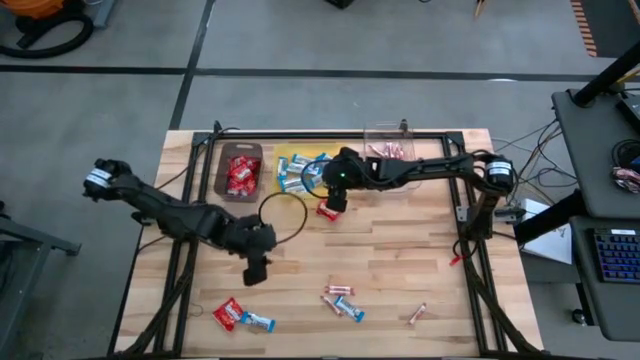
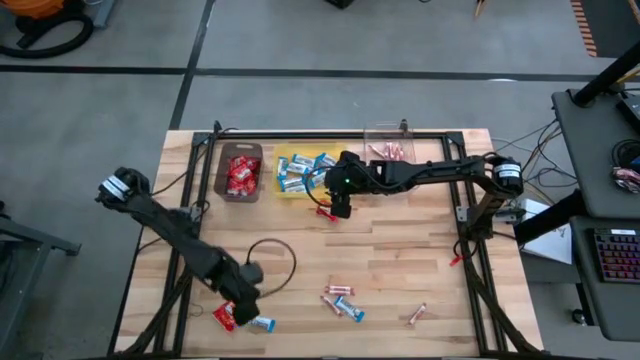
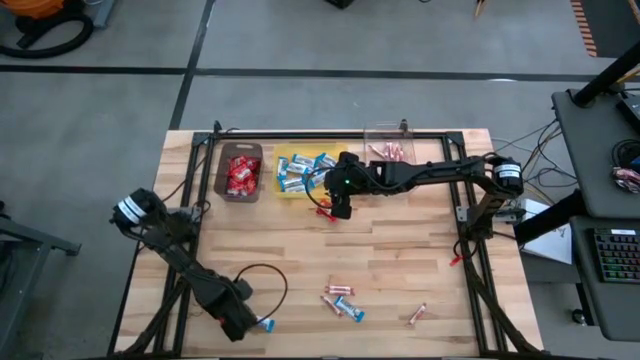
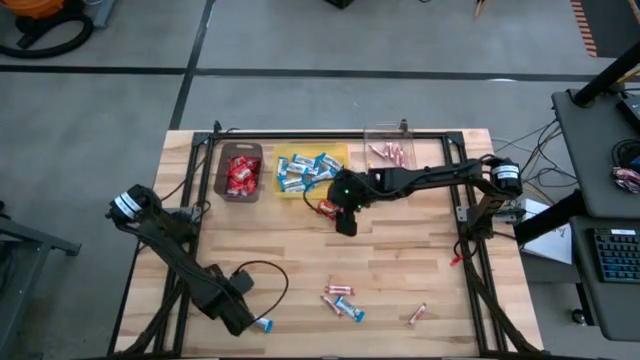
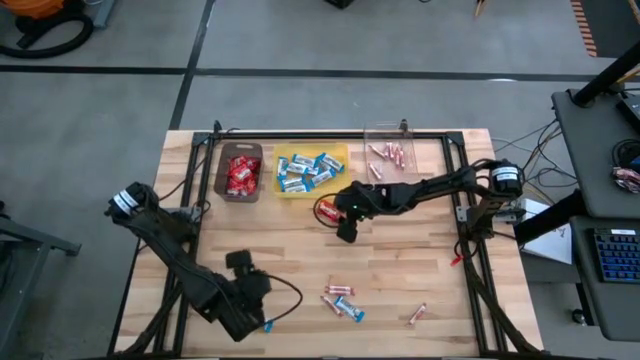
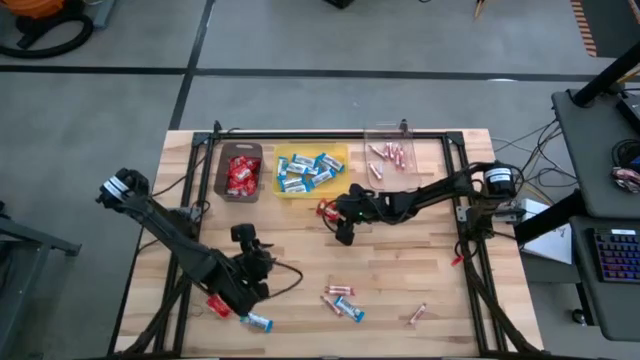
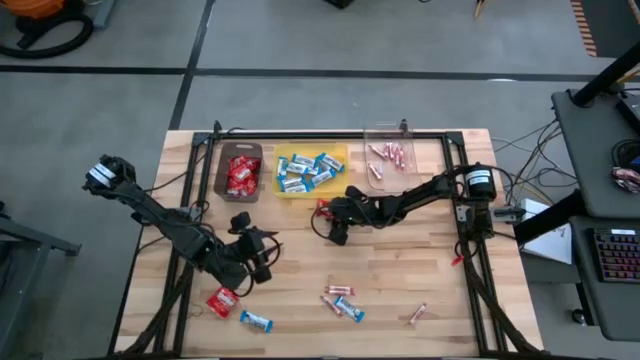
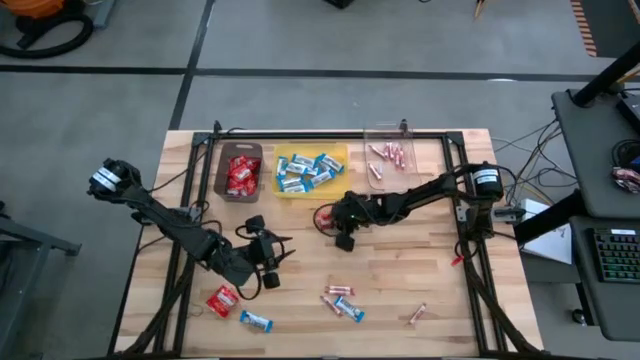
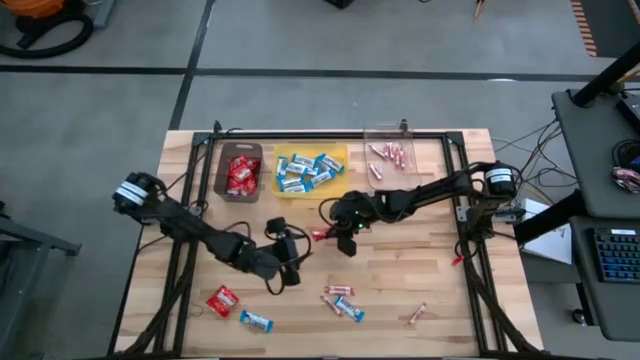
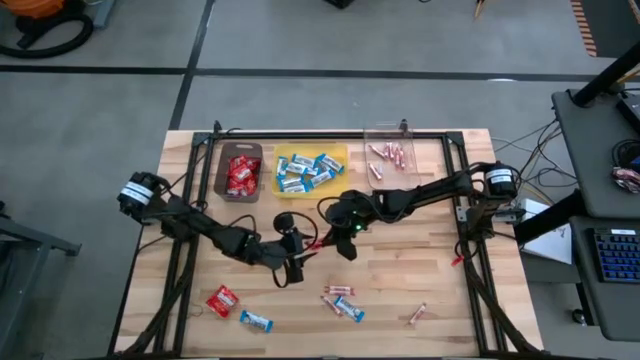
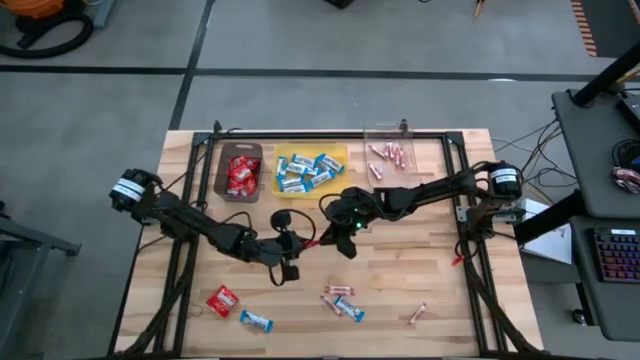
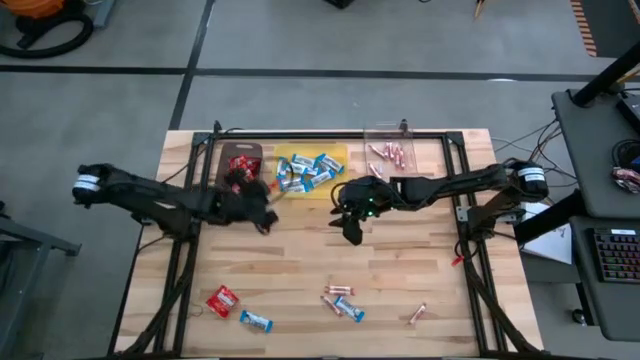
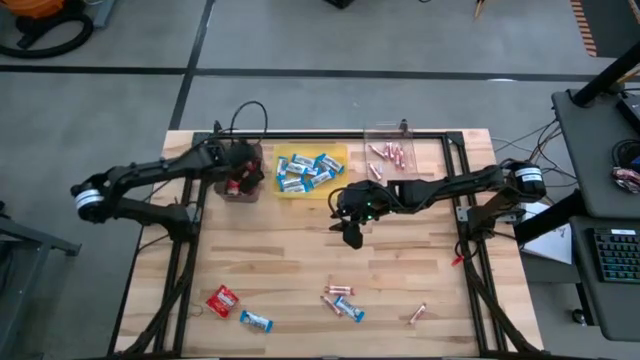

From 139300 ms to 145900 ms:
Task: Sort candy
Put the red candy into the black bin

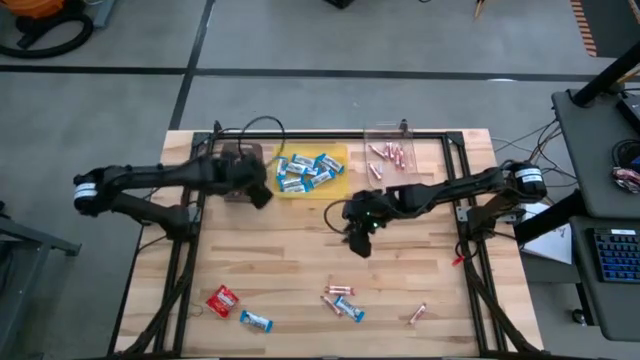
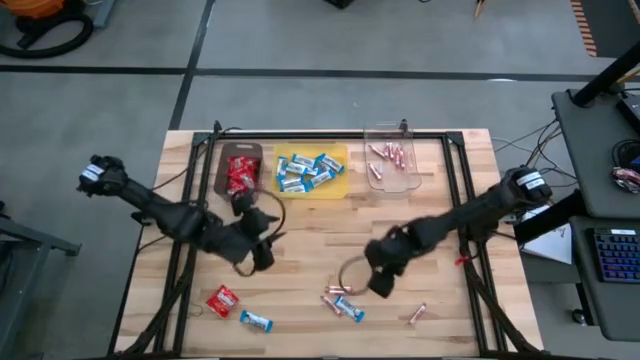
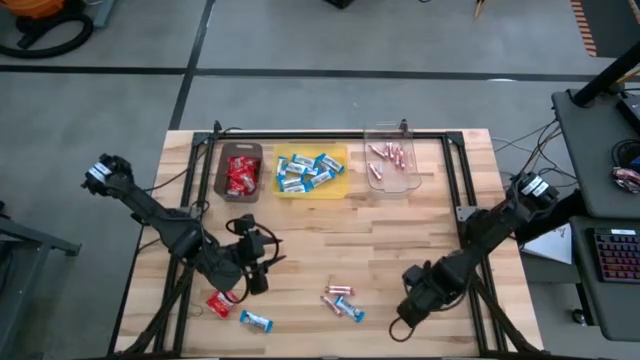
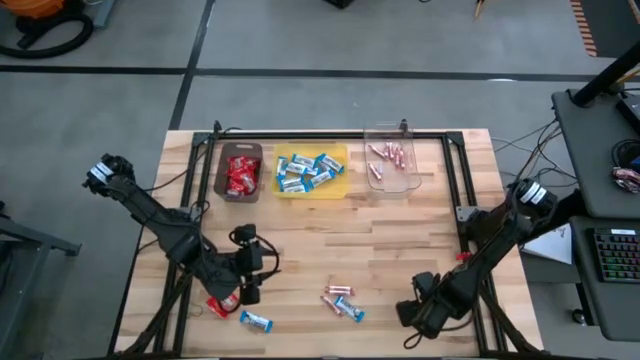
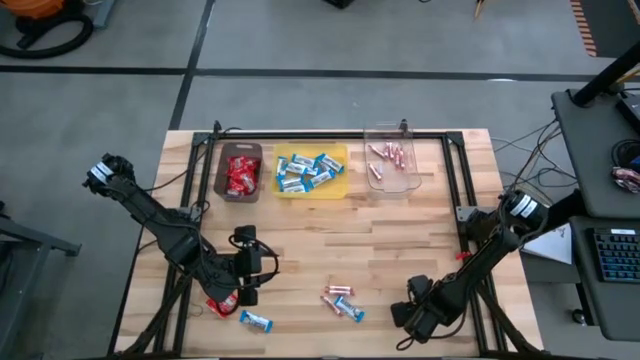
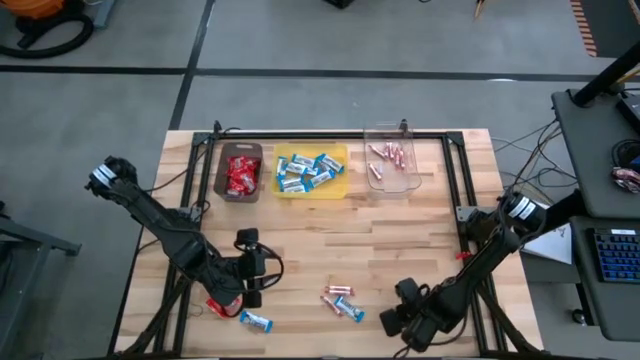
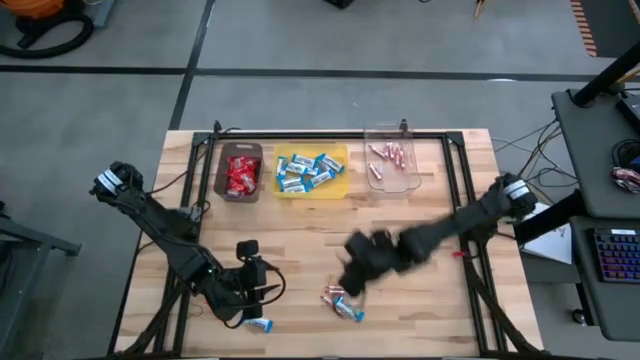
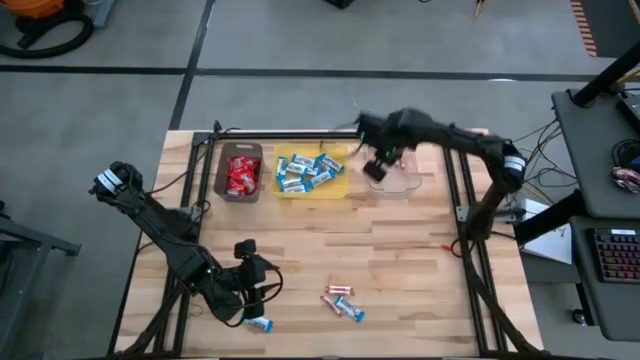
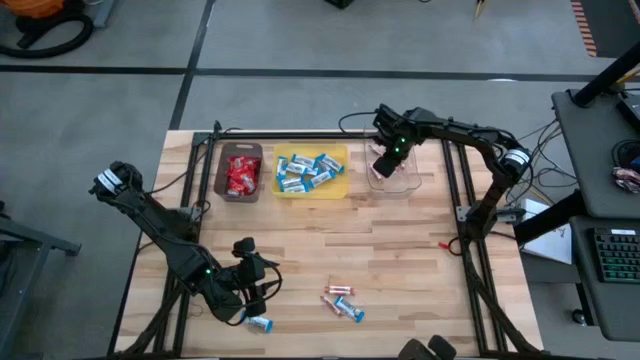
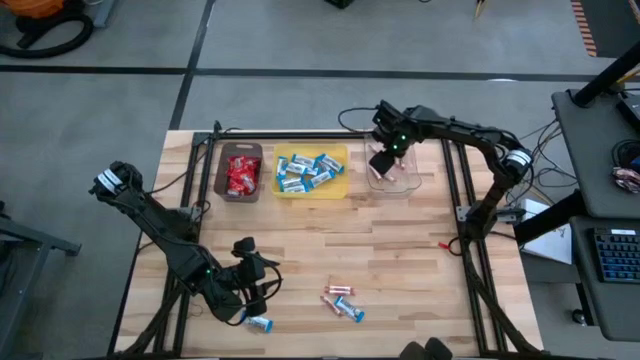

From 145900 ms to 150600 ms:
Put the orange candy into the transparent bin

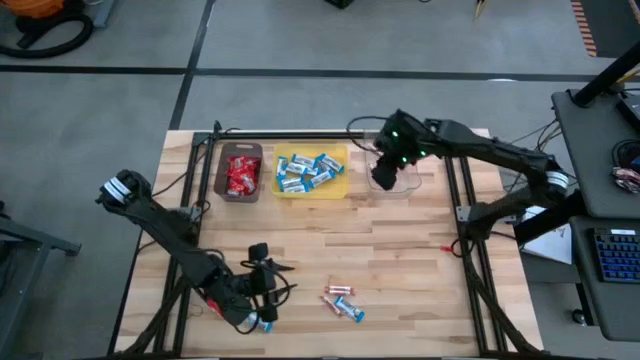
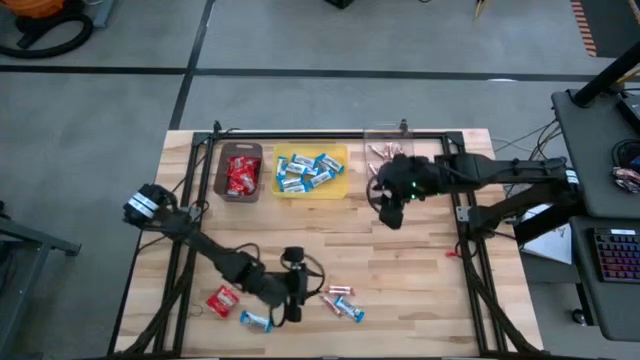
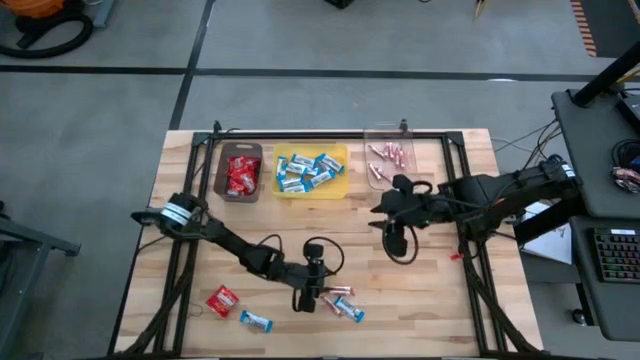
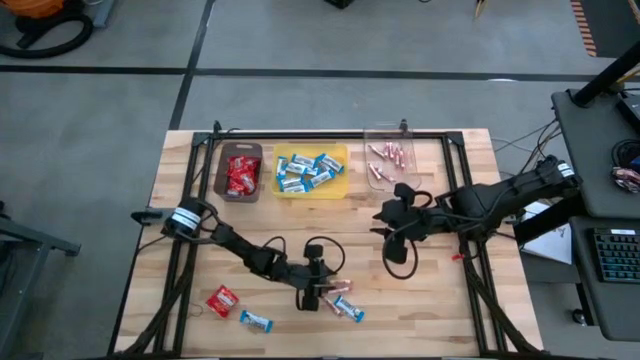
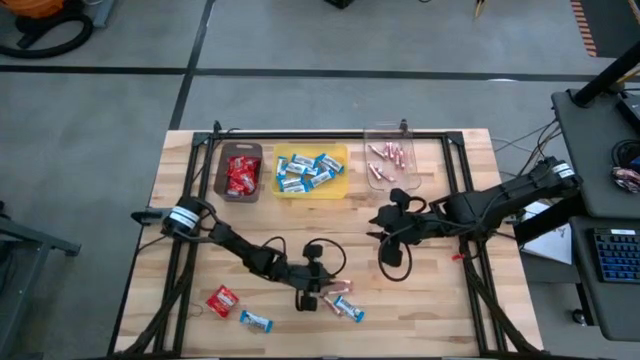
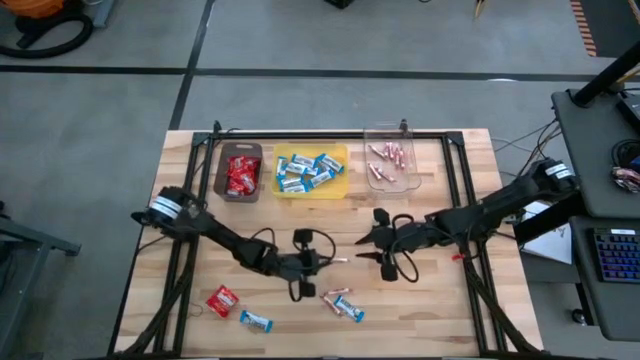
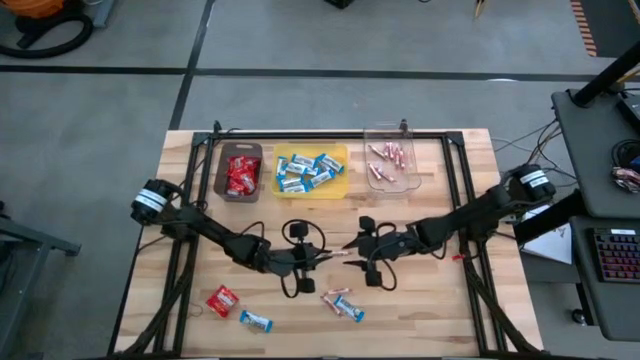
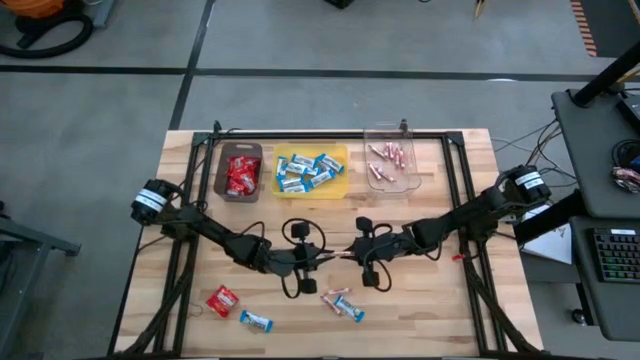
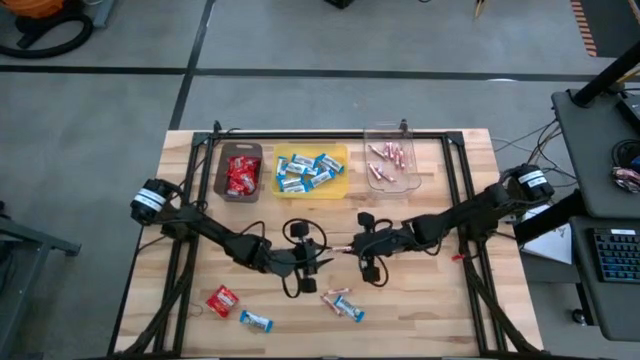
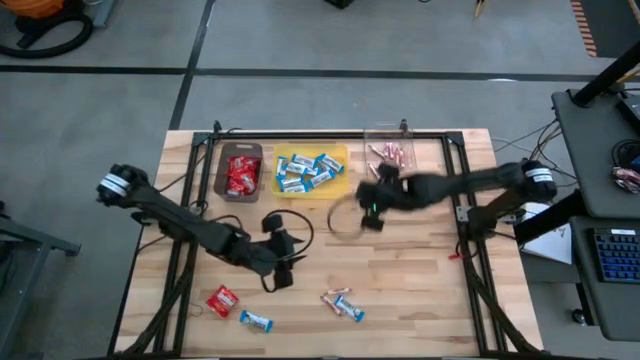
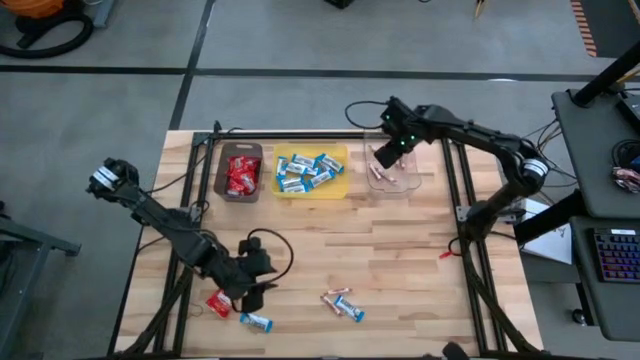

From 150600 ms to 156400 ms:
Put the orange candy into the transparent bin

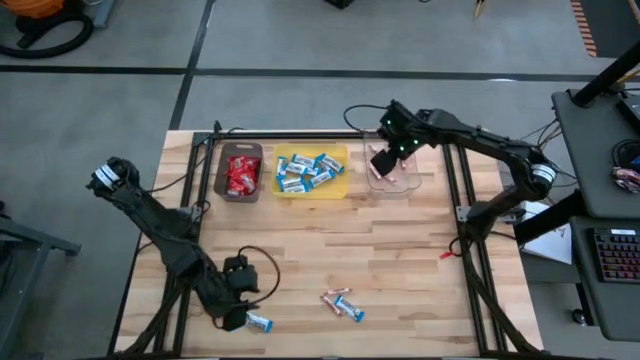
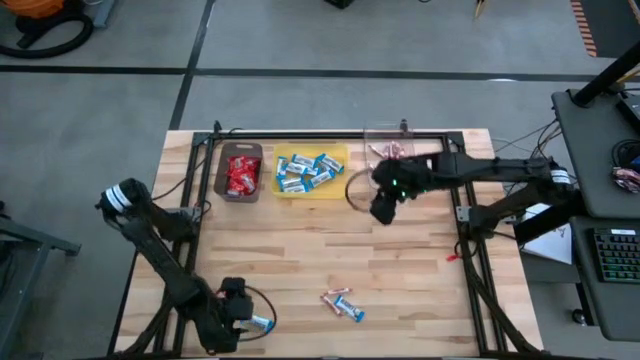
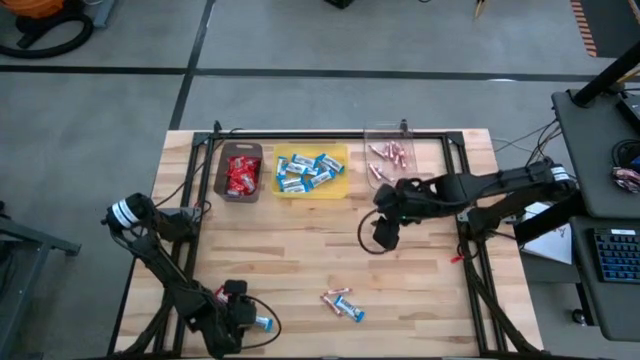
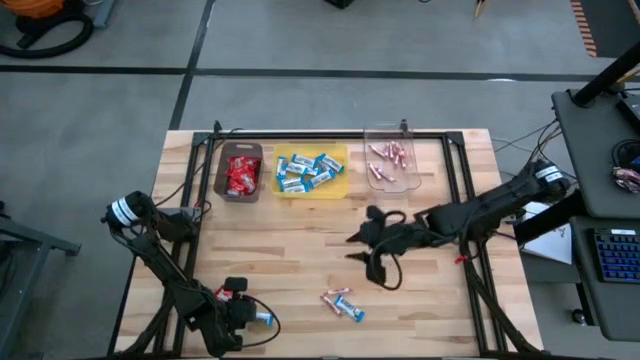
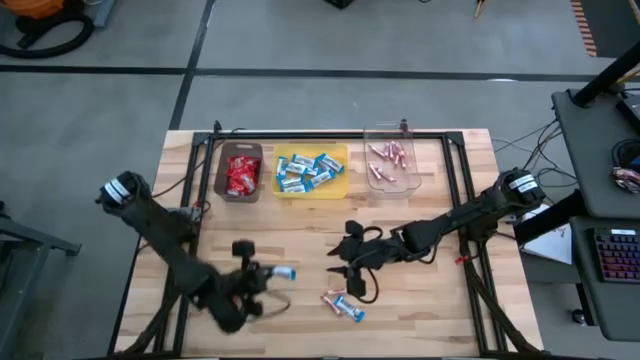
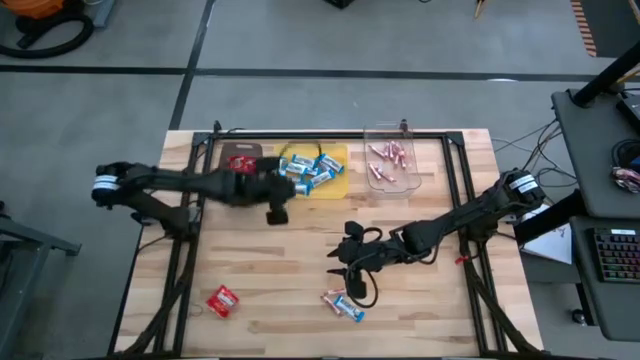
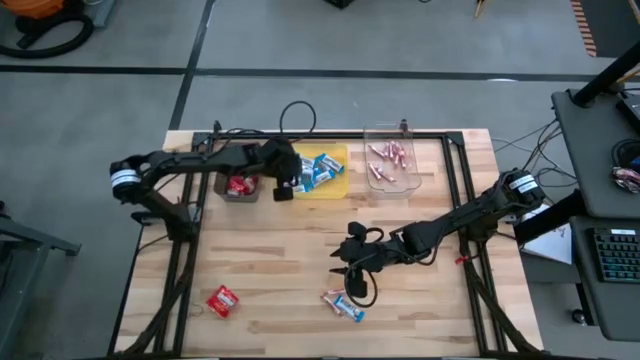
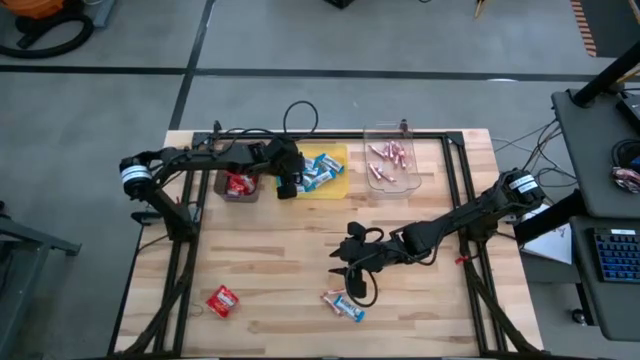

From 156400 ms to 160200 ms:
Put the white candy into the yellow bin

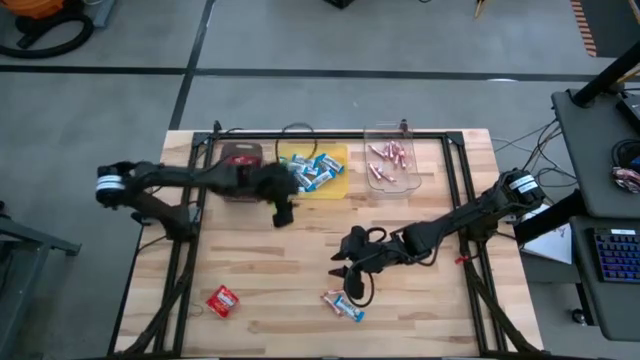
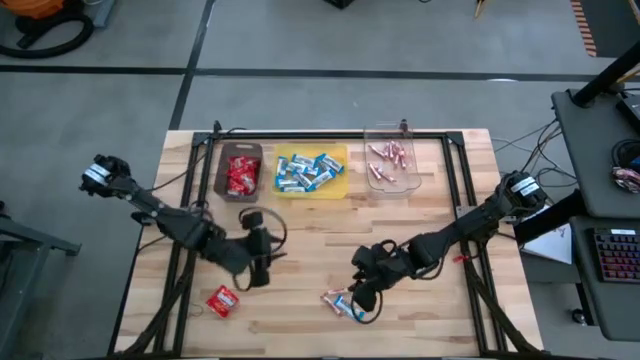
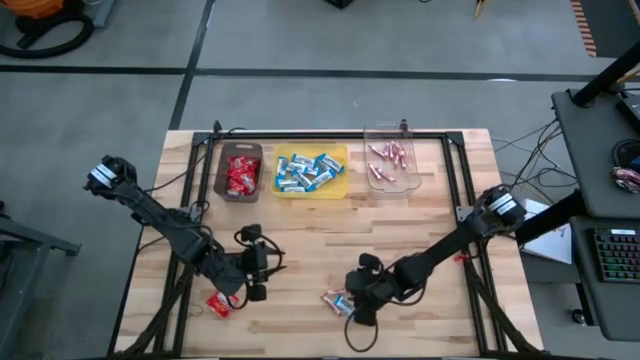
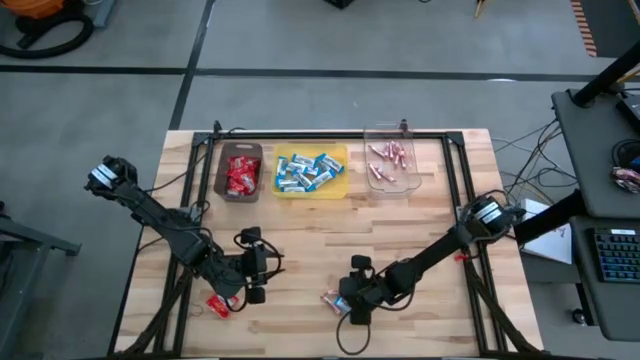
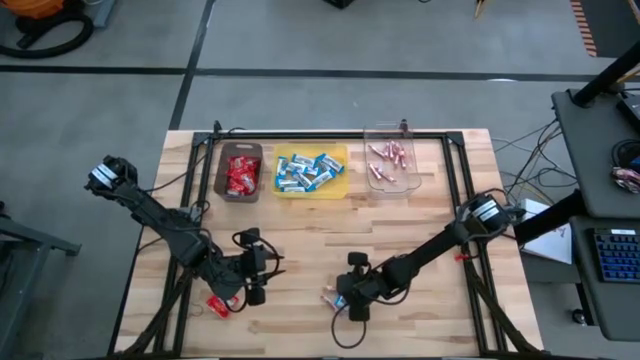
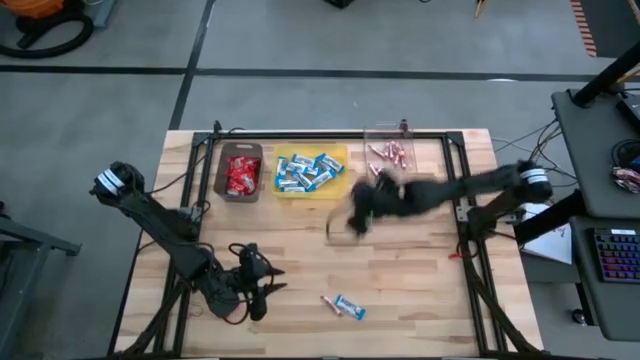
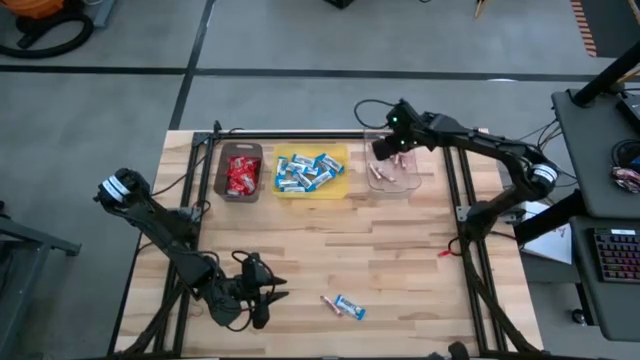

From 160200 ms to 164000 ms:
Put the orange candy into the transparent bin
